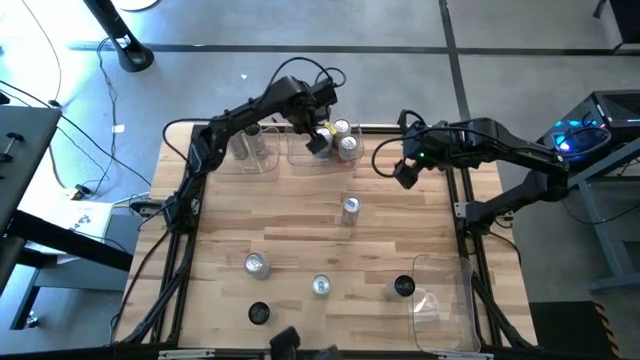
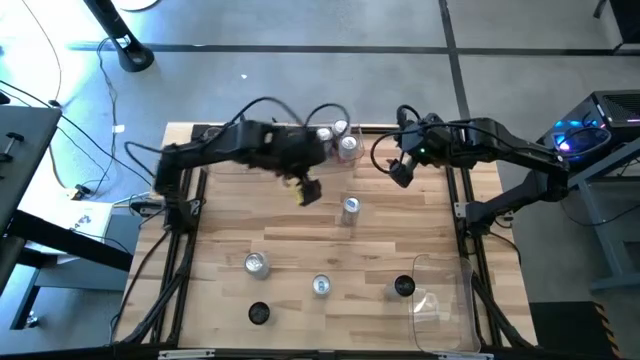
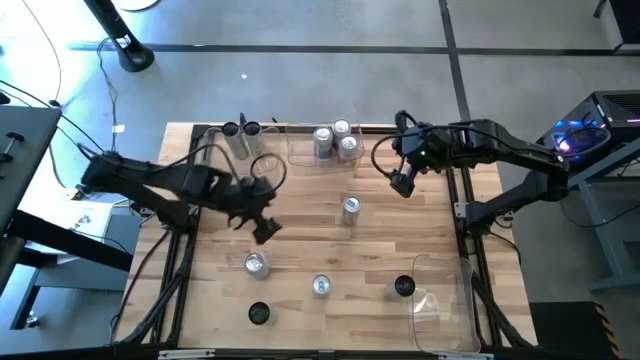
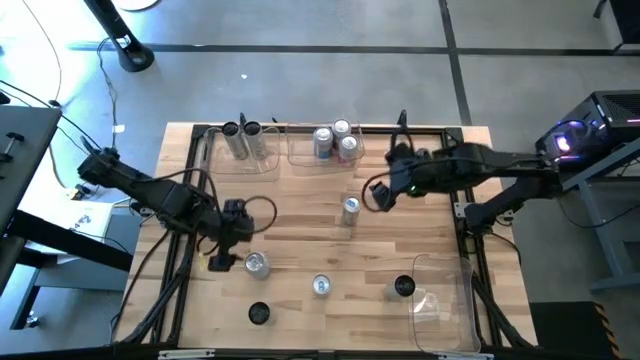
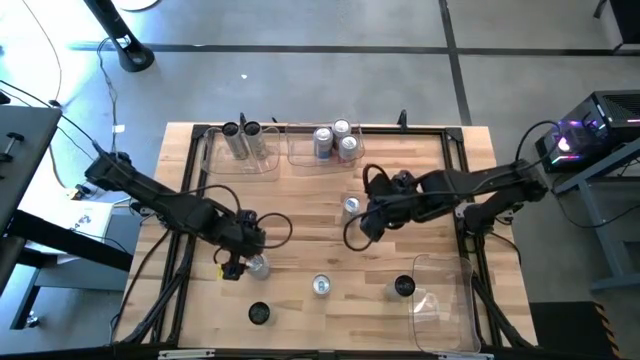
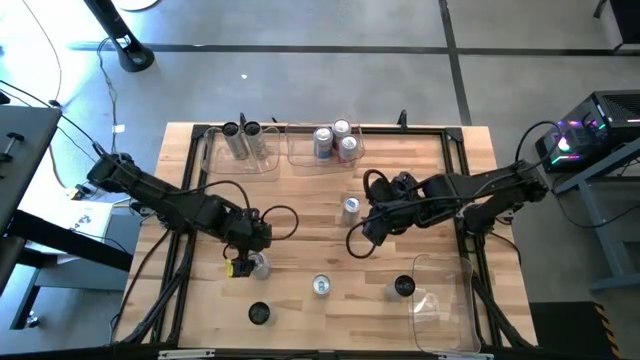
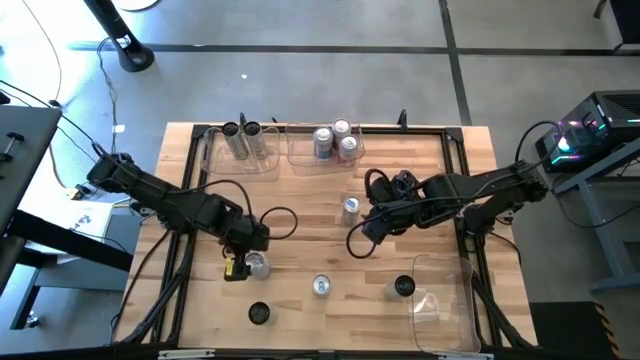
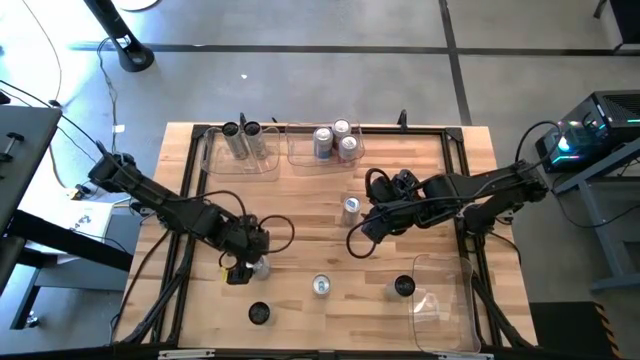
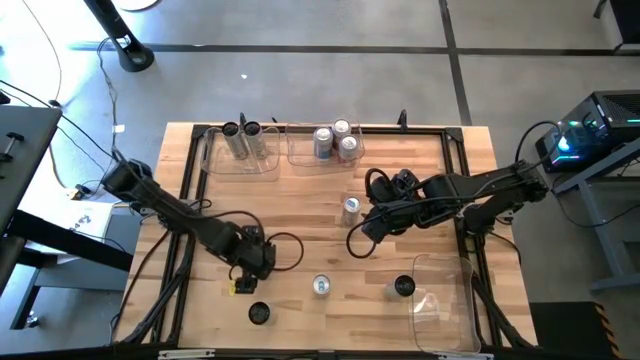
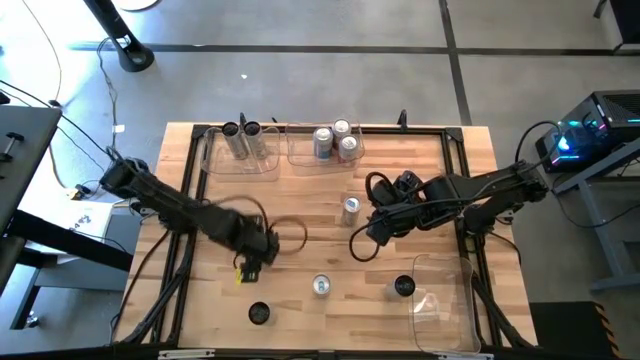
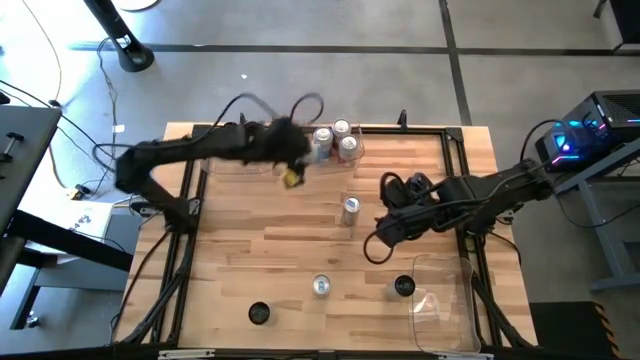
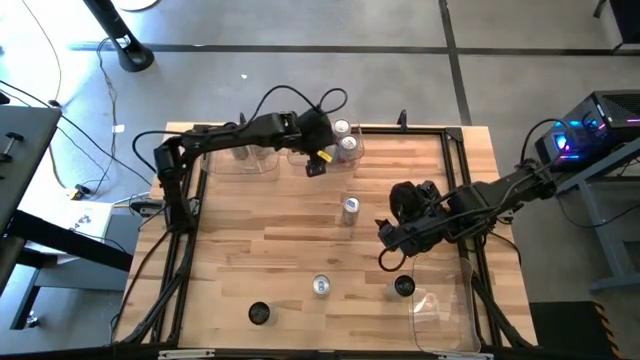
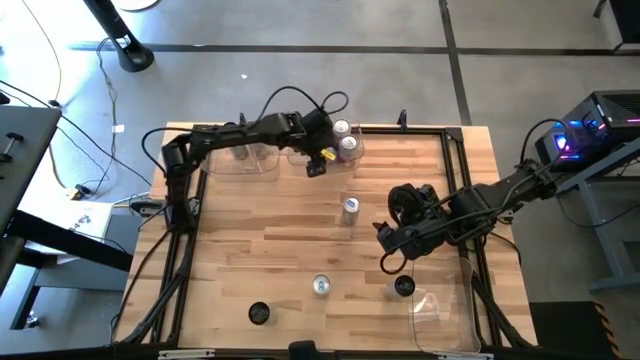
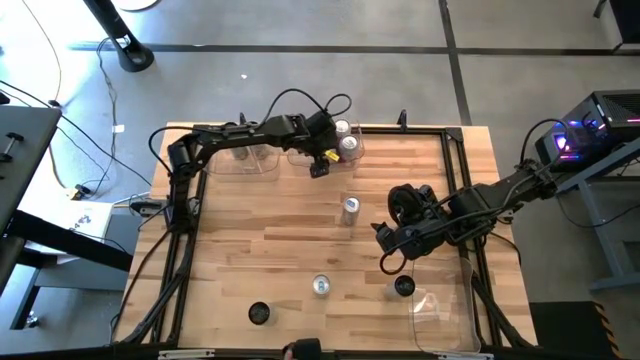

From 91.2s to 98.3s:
Task: Sort soda cans
Put the blue-white soda can into the top right transparent bin

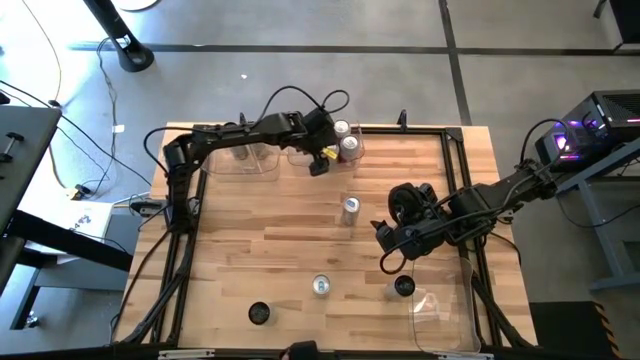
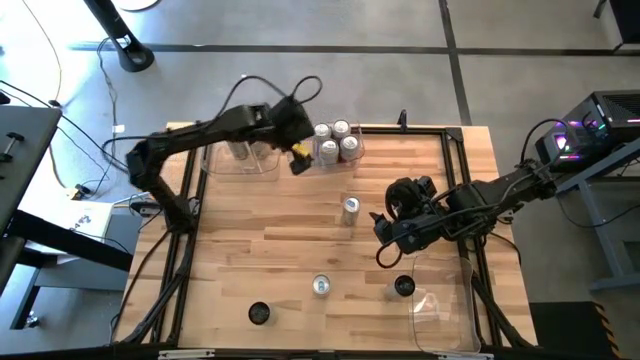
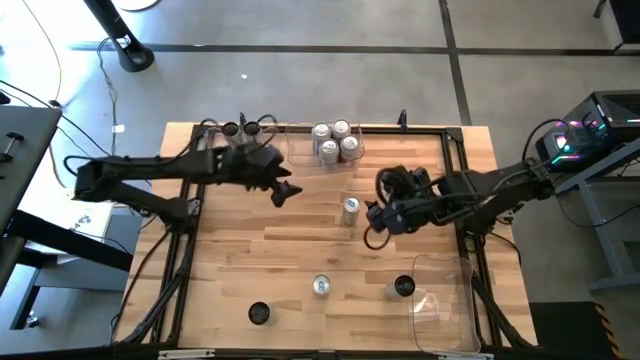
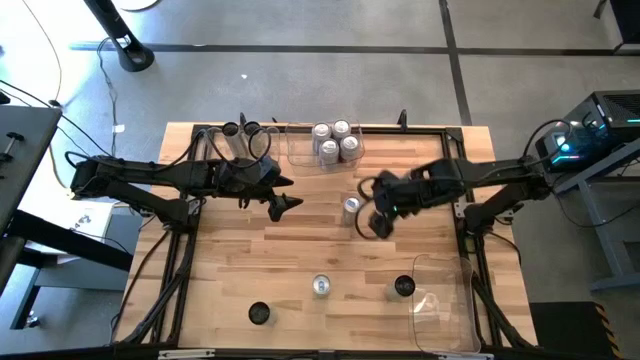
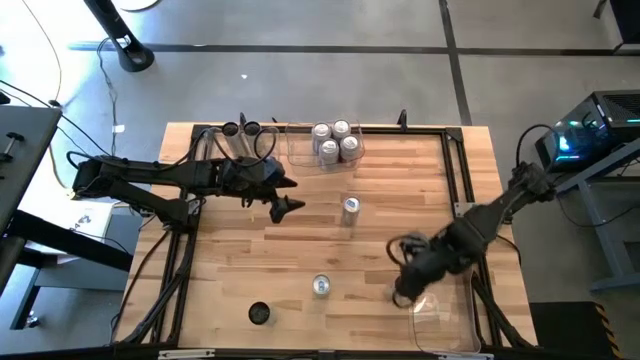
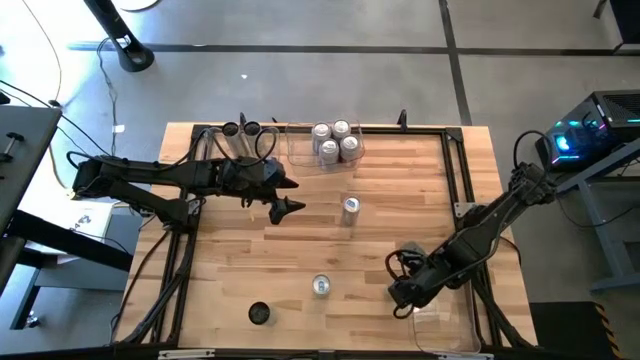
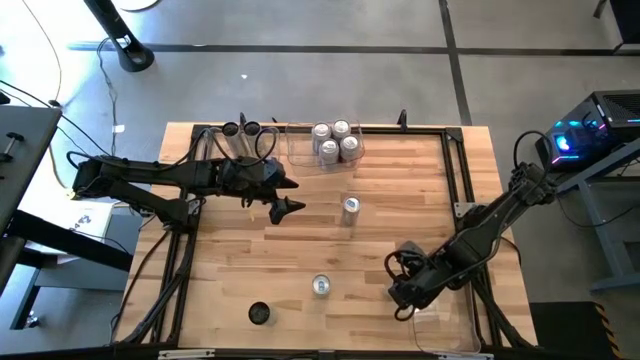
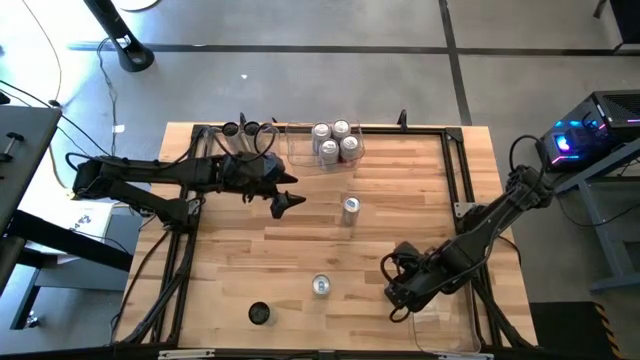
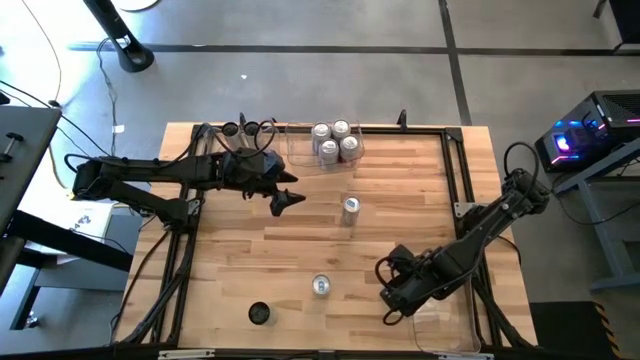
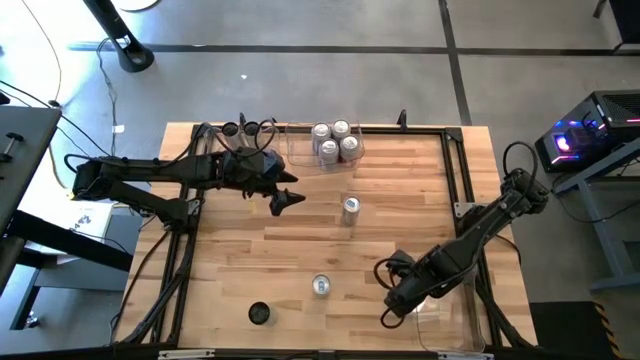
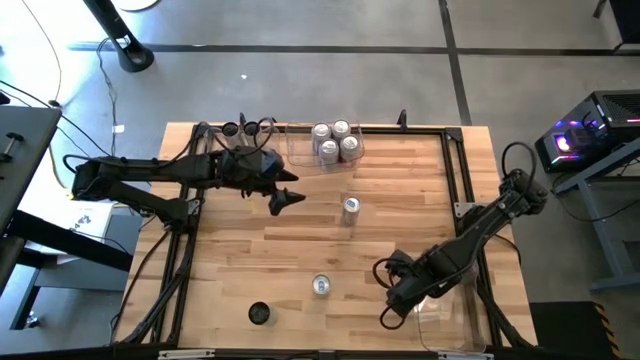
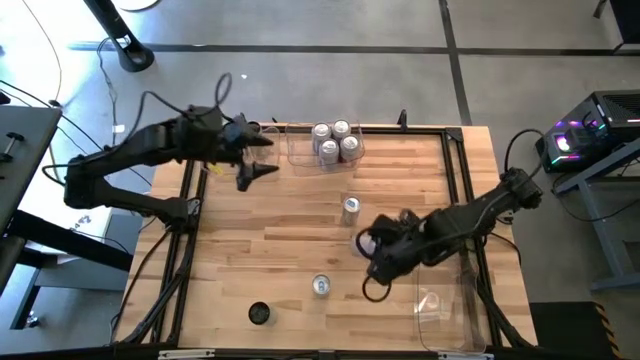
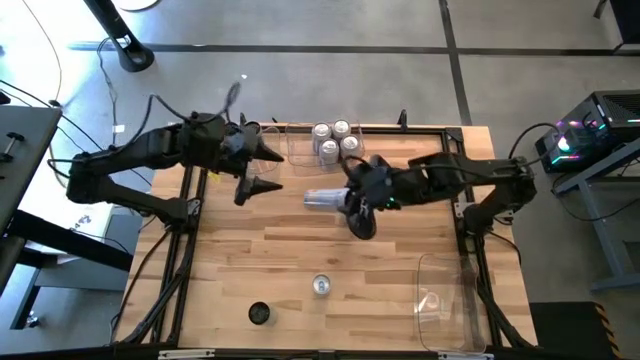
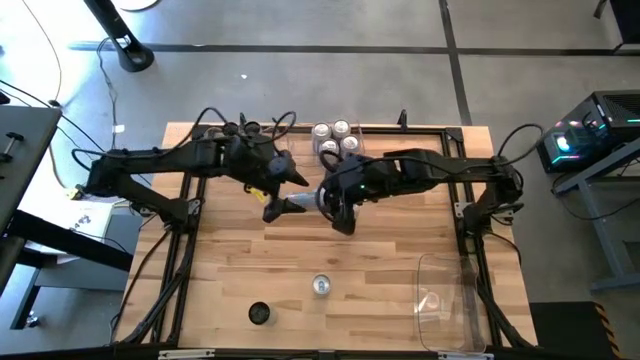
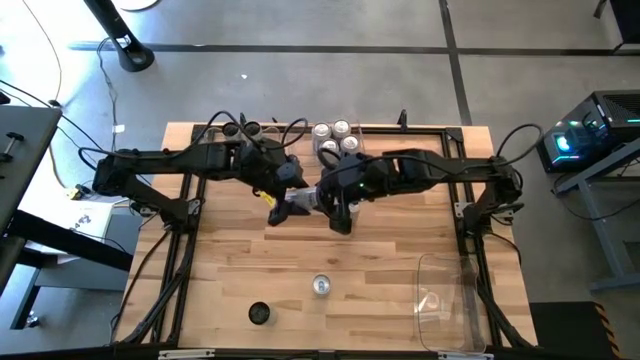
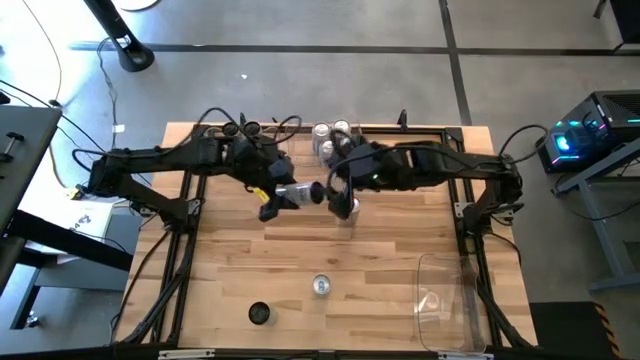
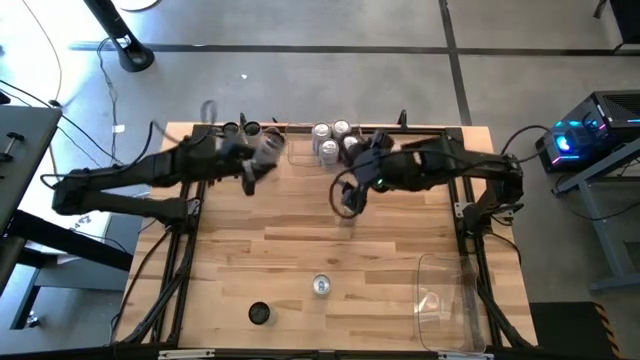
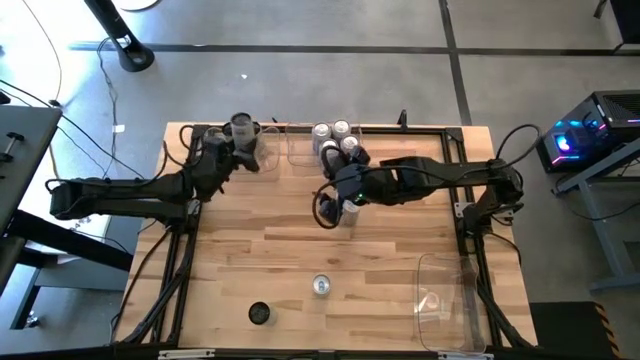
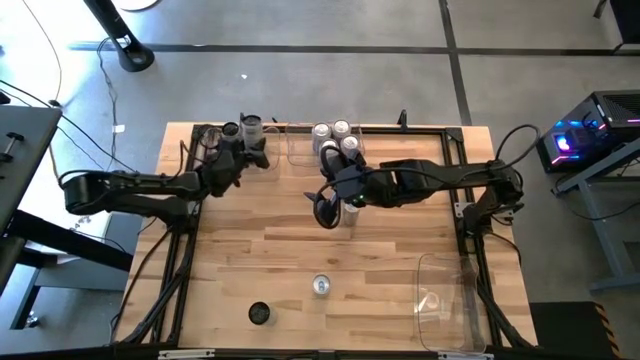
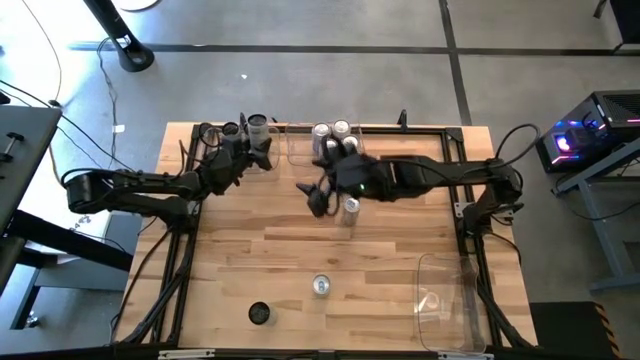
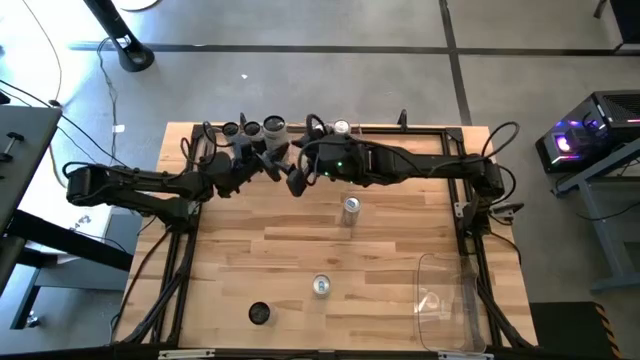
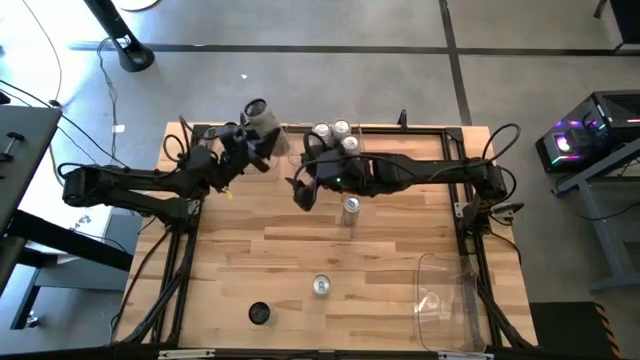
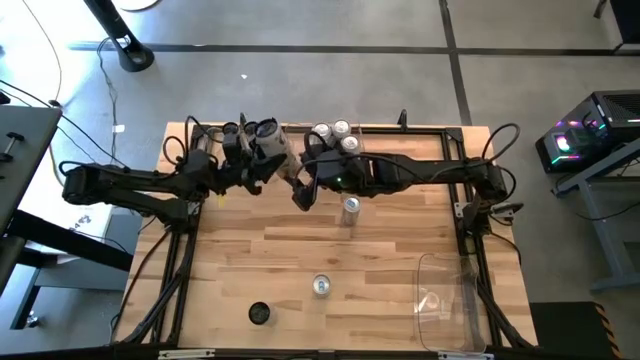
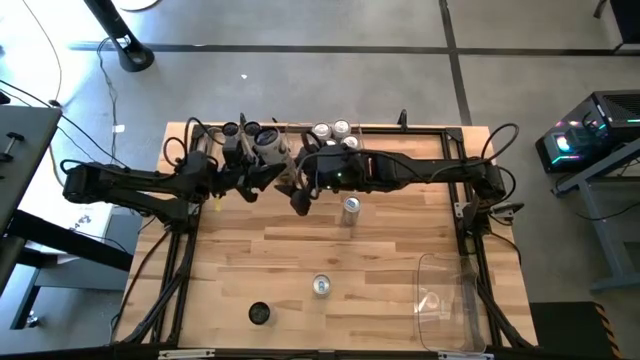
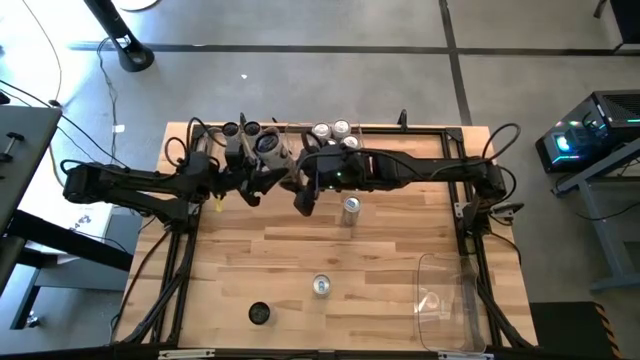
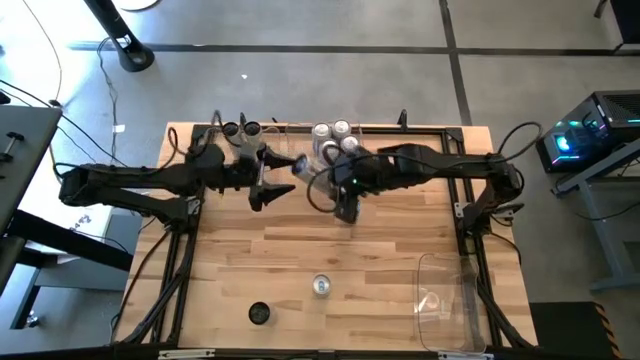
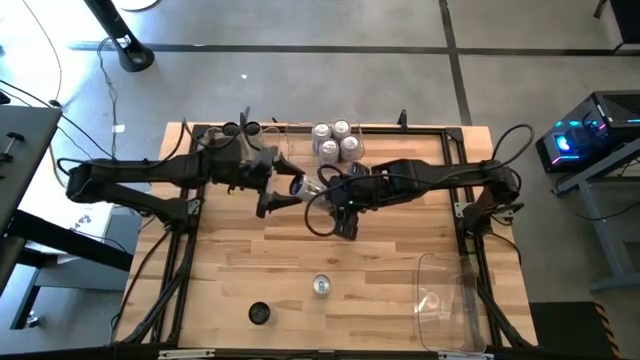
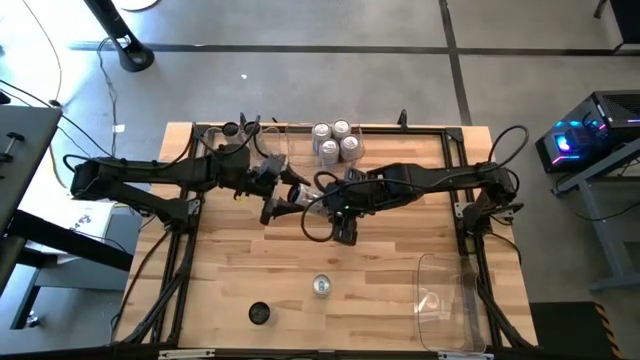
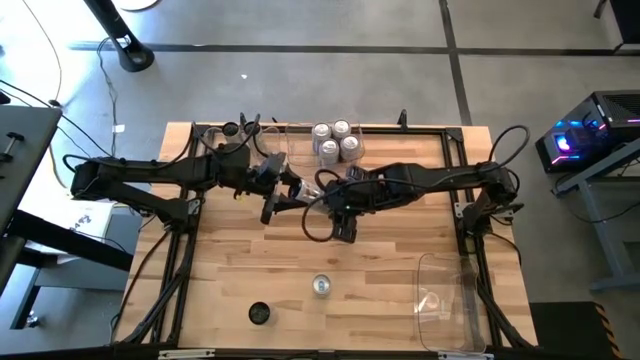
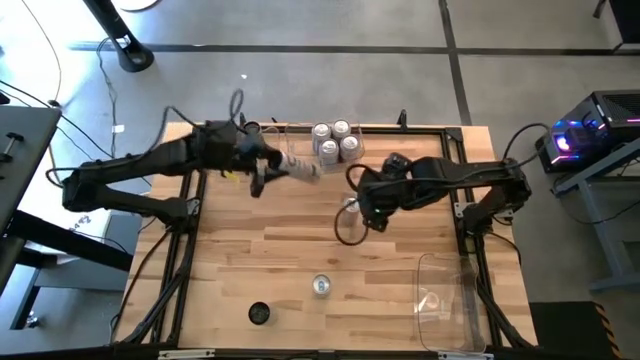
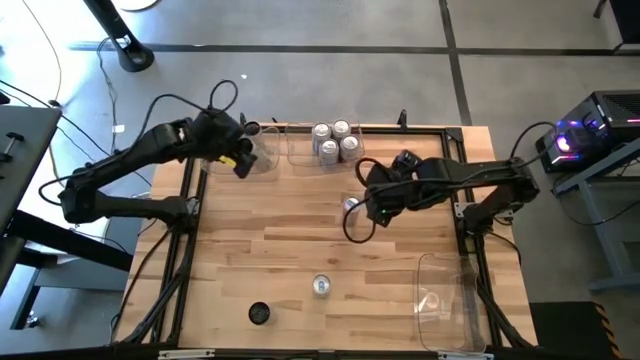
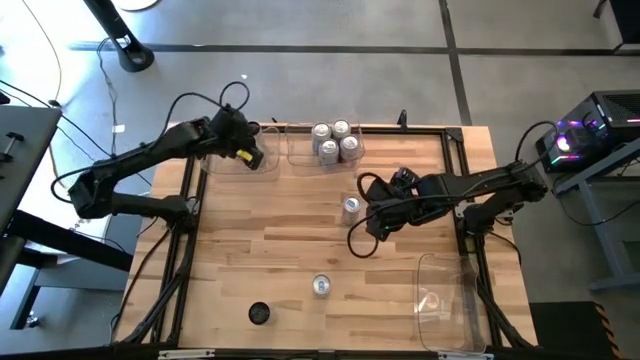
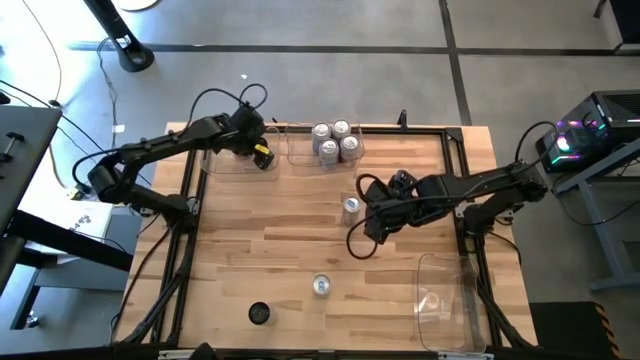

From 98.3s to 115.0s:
Put the right white-yellow soda can into the top left transparent bin
